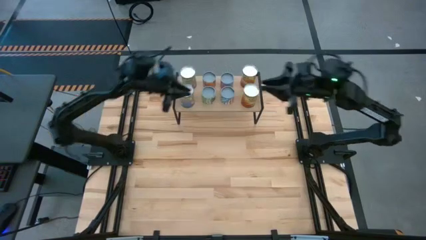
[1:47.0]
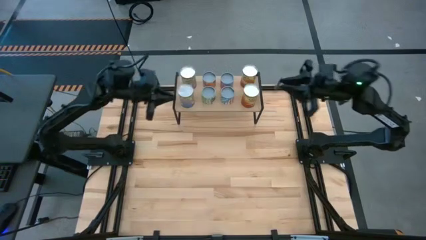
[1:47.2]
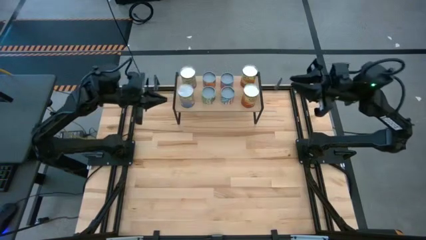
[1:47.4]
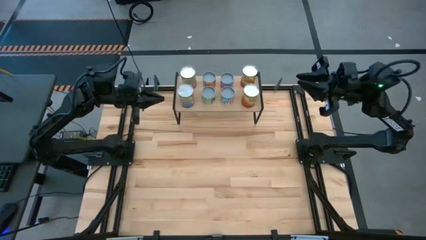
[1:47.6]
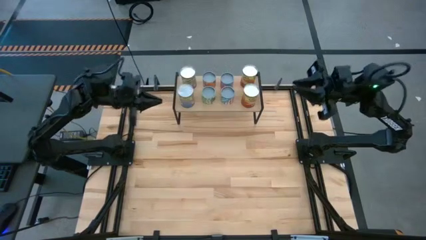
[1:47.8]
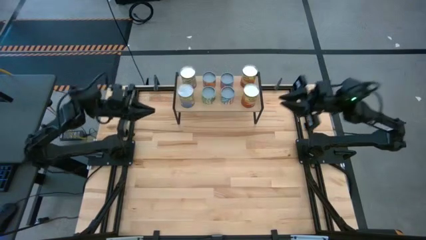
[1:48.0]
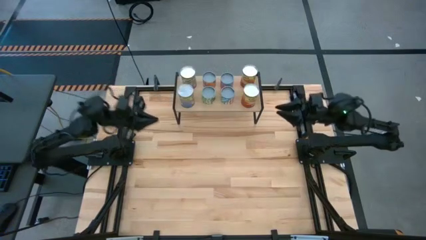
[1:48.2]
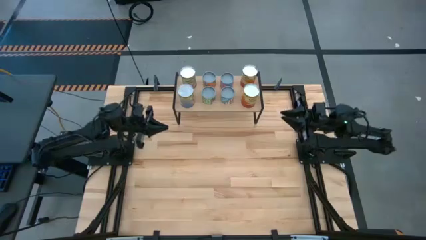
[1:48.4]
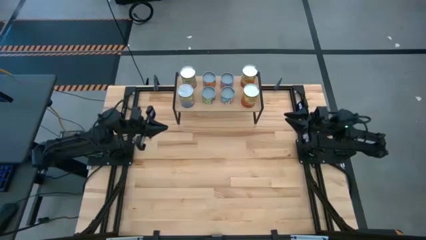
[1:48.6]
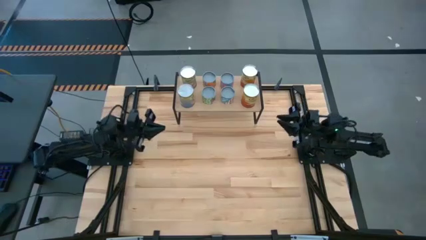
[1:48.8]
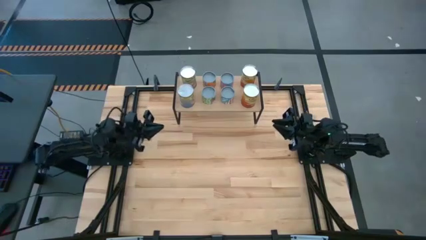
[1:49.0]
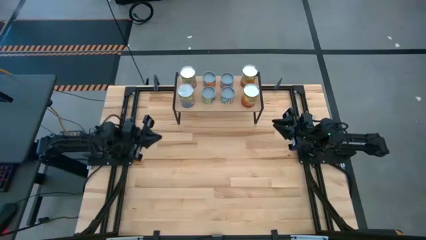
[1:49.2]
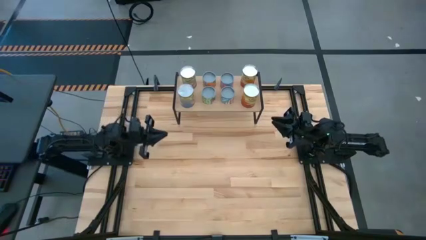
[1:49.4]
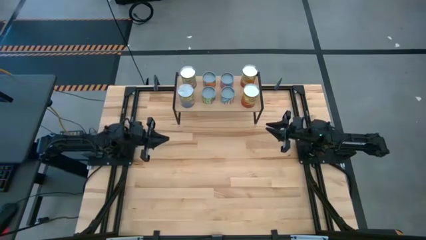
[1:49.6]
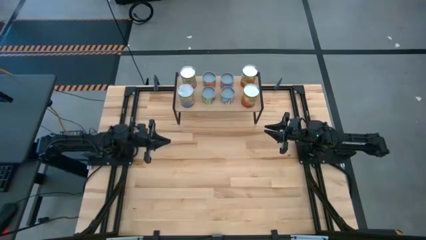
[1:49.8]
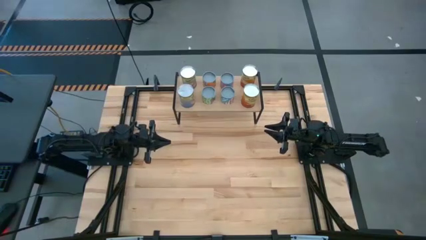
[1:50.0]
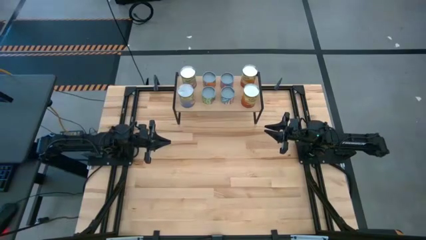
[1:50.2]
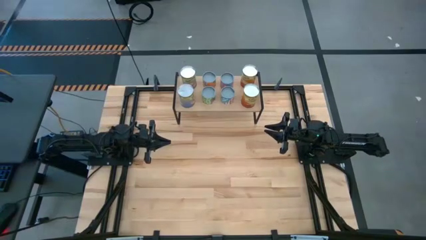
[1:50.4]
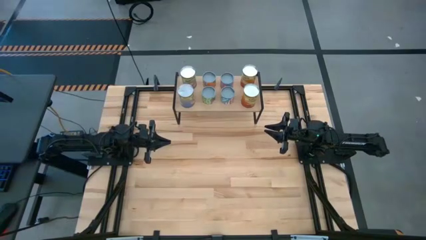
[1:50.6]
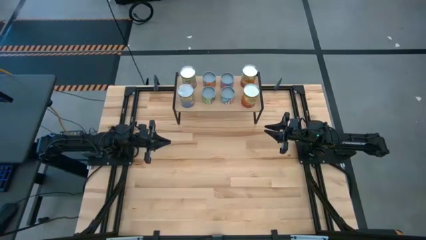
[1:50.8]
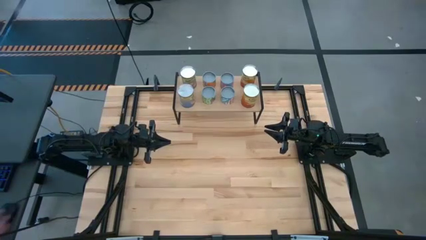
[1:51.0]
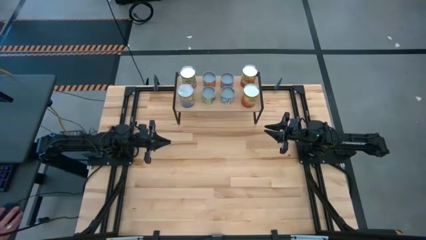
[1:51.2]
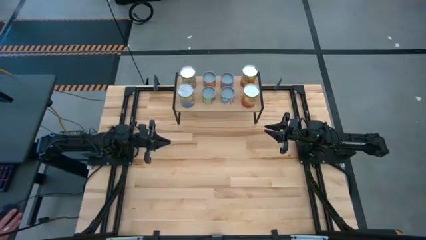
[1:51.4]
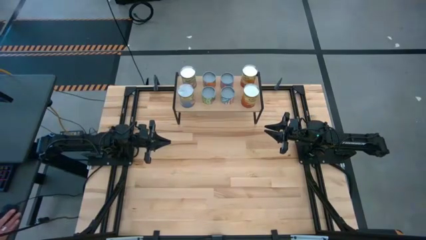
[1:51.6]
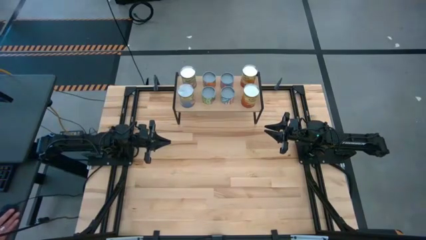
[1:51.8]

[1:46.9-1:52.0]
Task: Pick and place cans onto a shelf
Return to Home Position

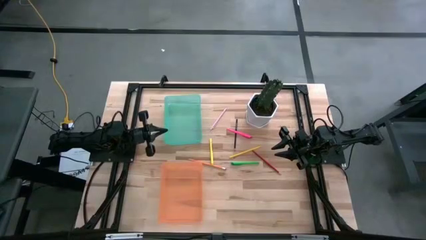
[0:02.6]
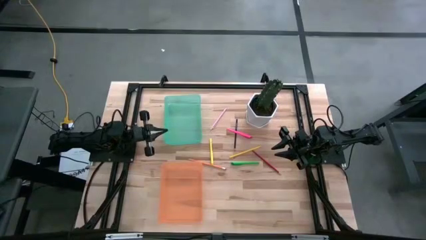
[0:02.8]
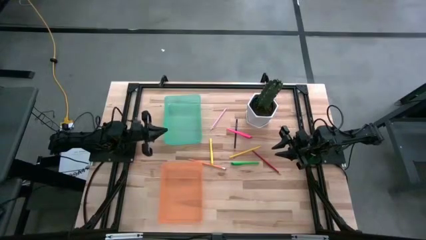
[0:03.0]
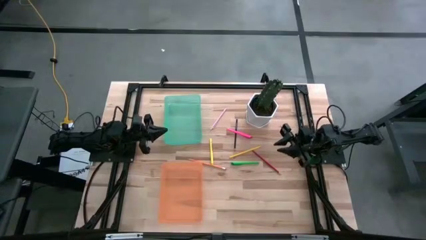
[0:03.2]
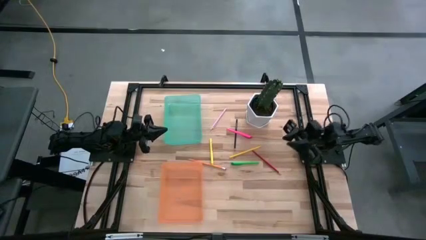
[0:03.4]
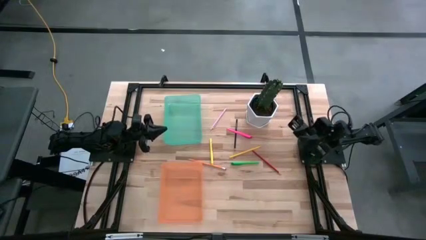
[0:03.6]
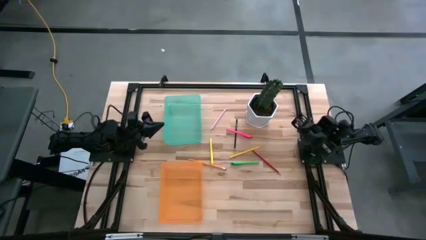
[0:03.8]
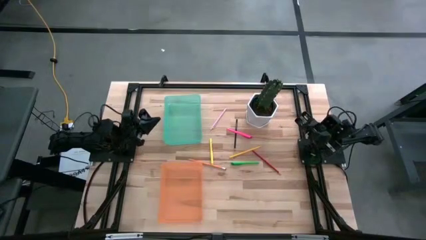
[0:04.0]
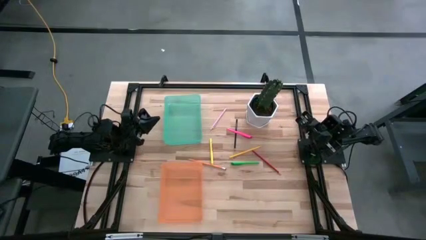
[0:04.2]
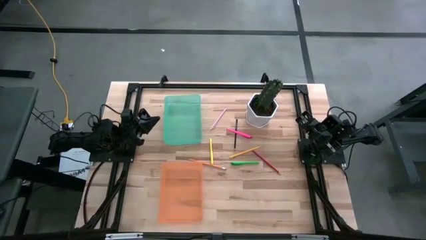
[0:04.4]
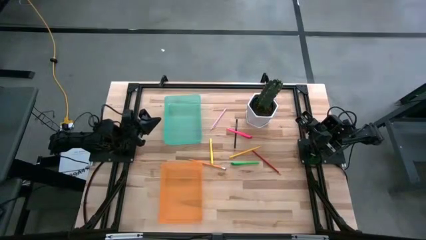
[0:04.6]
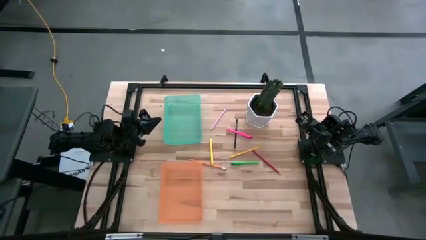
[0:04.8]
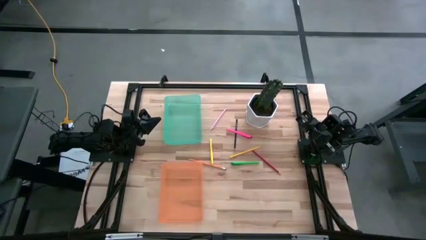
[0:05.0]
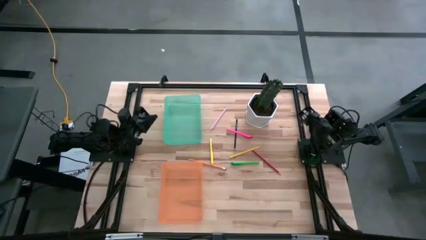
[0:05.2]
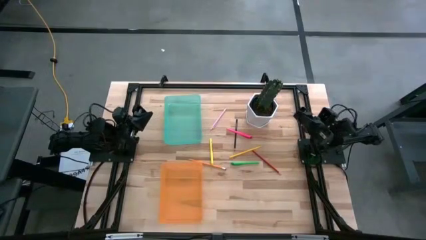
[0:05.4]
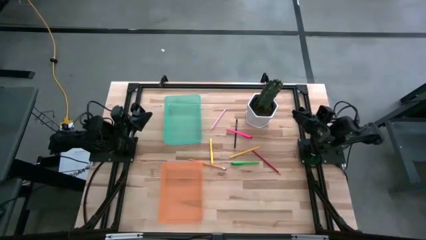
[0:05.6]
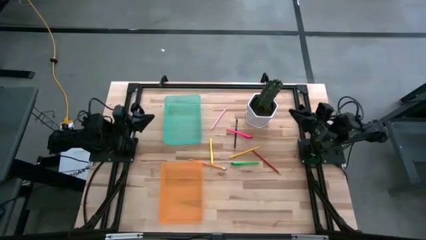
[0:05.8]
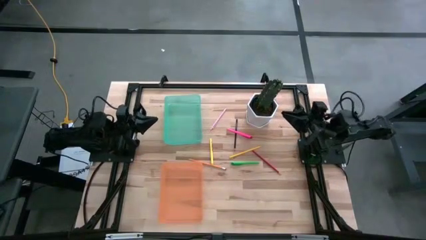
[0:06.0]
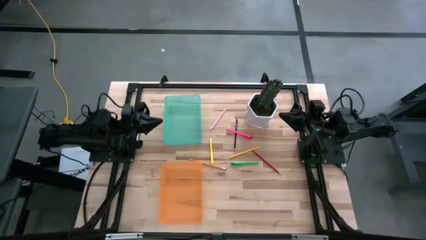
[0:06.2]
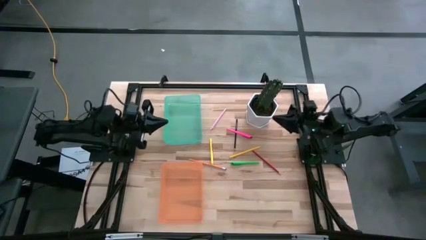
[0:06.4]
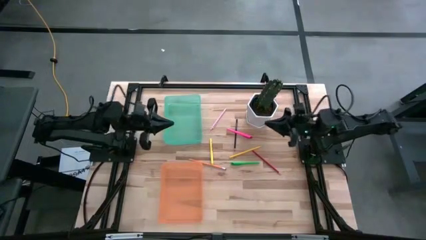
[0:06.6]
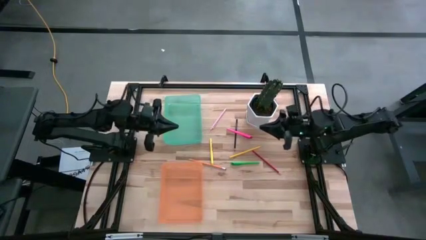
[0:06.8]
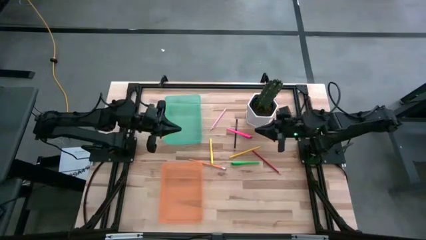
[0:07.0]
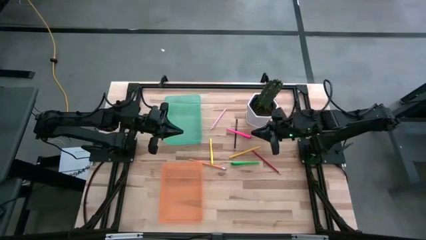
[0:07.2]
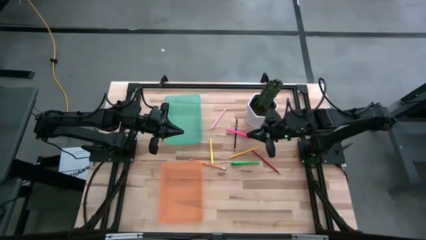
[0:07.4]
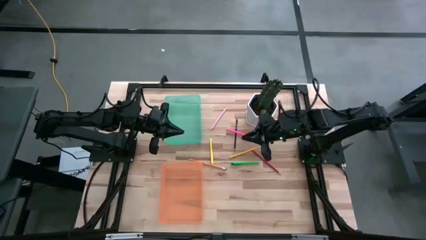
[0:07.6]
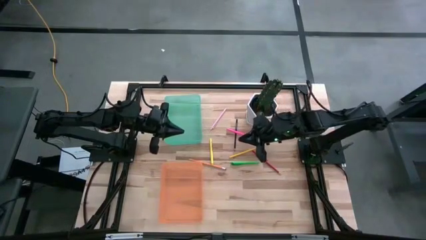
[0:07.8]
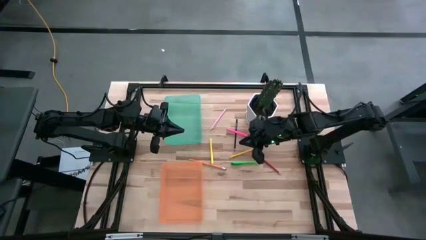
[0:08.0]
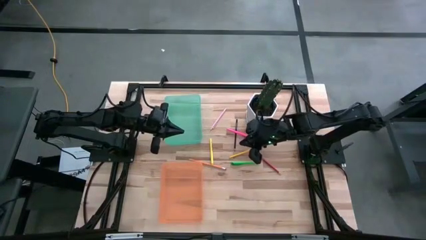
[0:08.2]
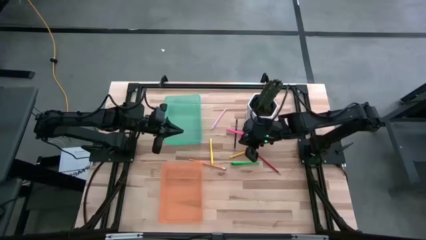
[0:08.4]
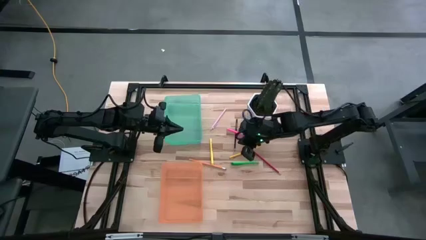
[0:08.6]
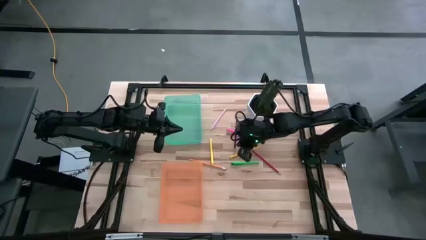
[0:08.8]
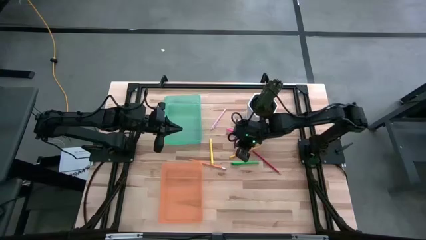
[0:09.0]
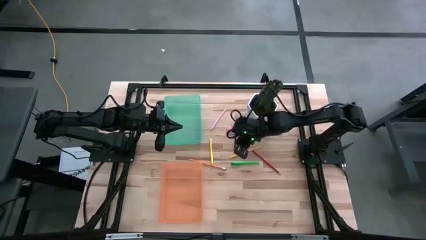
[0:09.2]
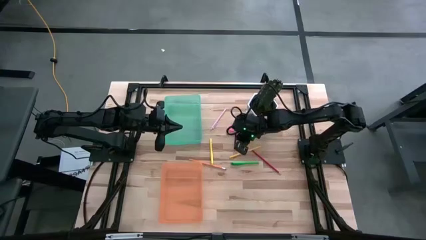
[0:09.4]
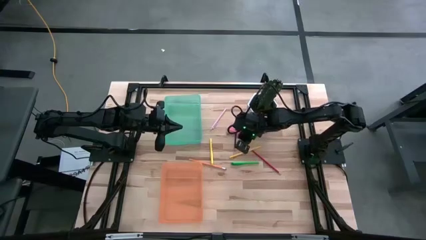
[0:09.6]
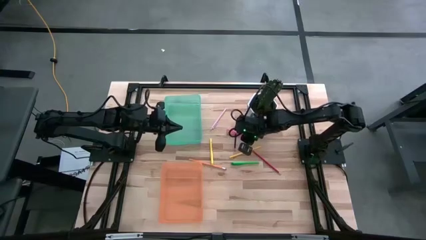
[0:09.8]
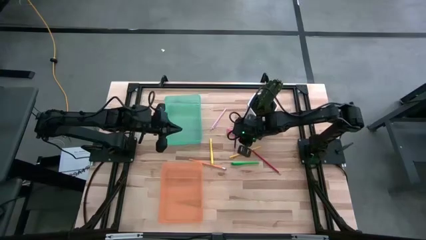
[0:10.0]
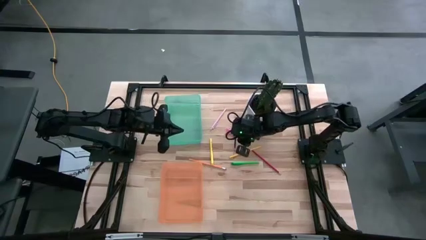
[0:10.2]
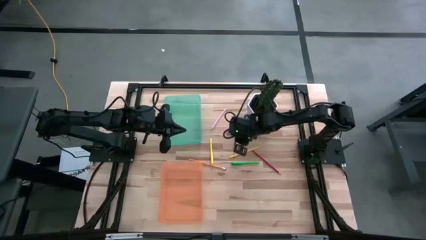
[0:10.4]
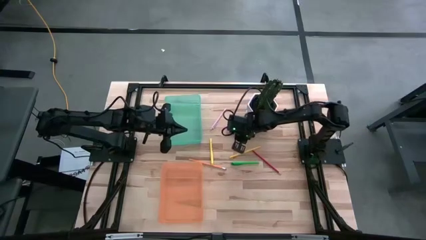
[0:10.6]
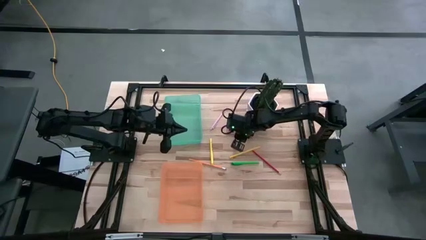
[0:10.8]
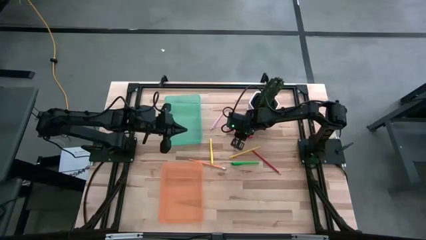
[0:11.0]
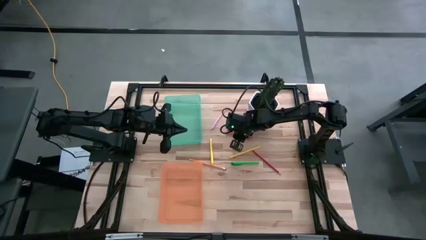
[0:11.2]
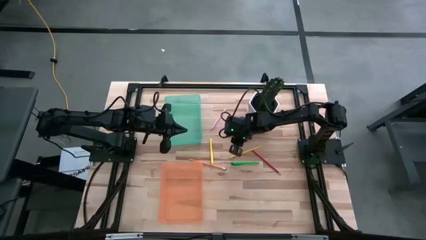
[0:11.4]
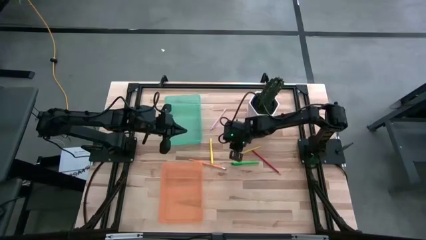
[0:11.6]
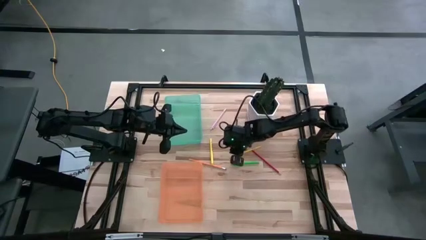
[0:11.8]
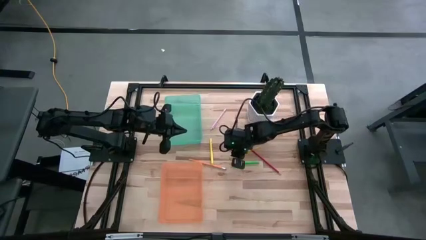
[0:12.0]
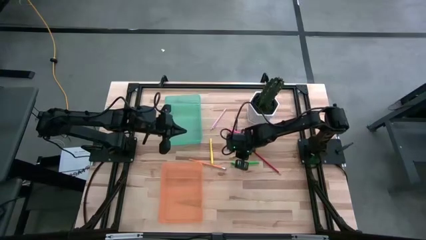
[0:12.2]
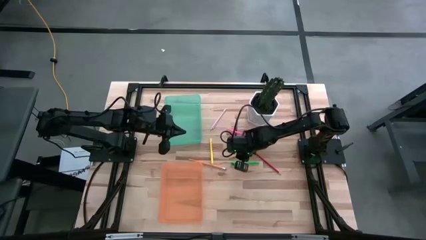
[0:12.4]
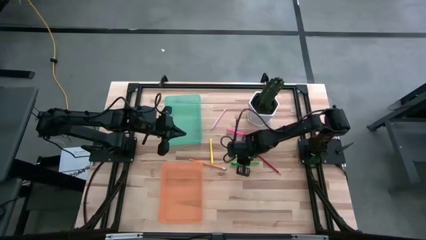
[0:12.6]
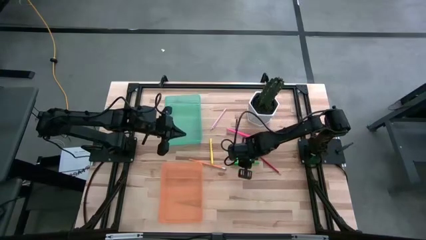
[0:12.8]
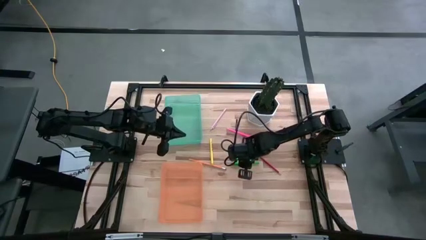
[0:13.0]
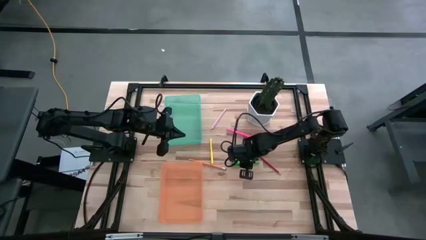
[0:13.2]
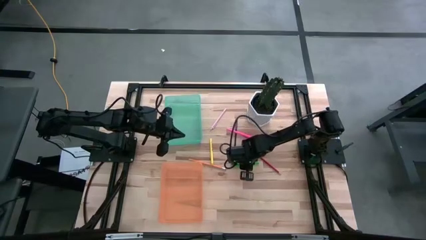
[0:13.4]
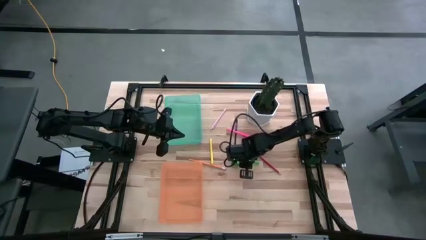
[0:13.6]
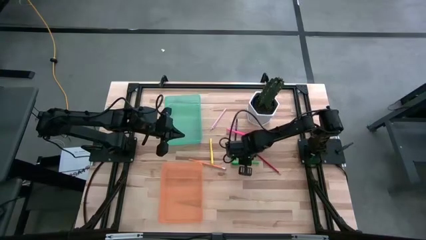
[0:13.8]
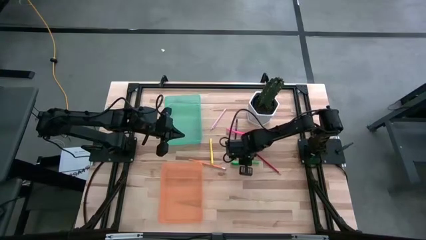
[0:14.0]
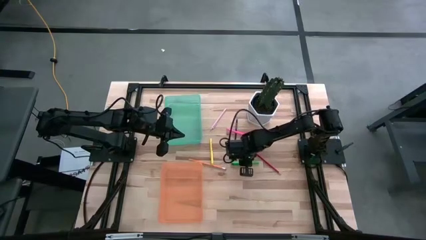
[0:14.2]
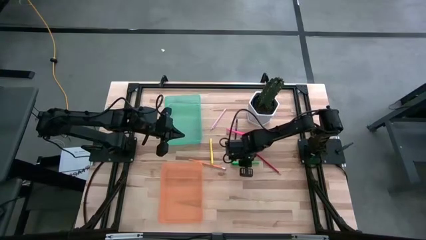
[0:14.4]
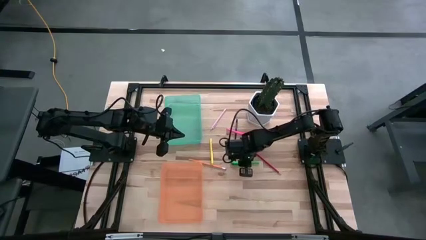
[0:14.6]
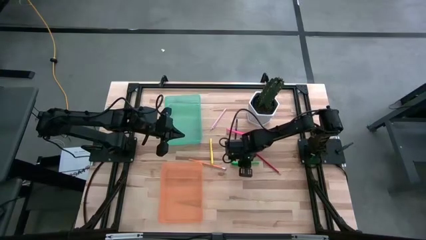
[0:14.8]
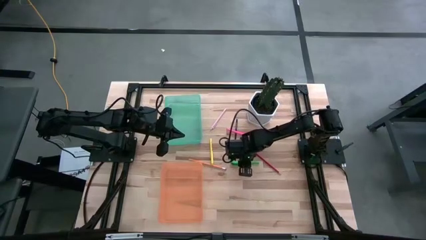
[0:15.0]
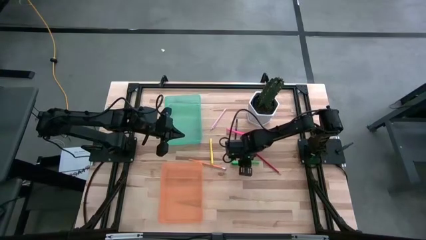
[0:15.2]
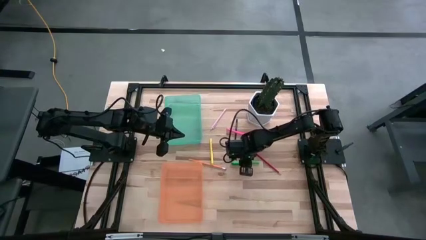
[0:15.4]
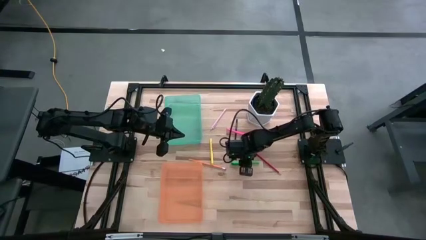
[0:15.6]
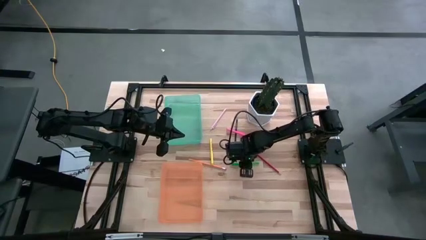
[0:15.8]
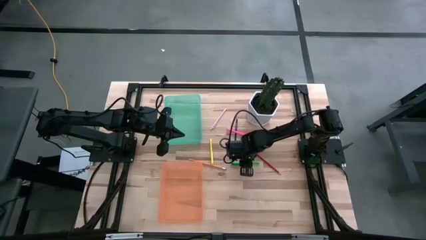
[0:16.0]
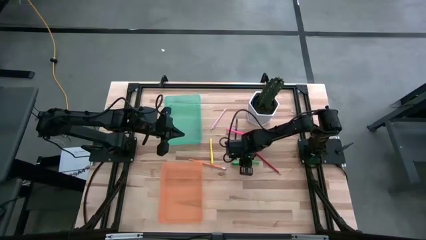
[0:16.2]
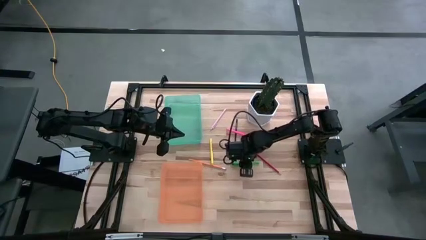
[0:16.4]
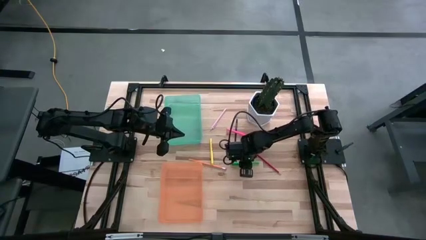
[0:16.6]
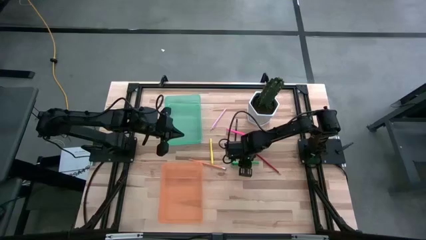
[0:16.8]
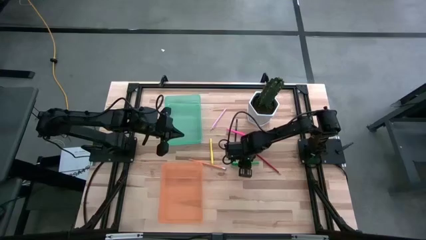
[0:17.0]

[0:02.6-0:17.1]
Task: Sort pens & pencils
Put the green pen into the green bin
